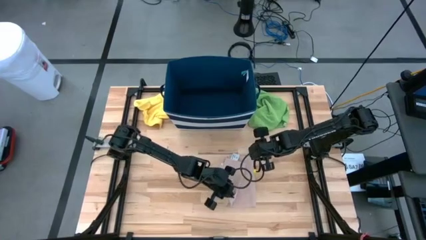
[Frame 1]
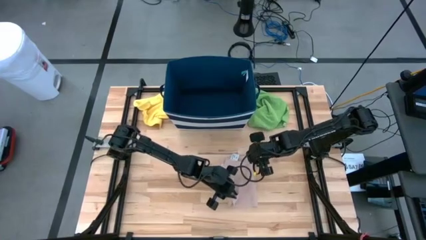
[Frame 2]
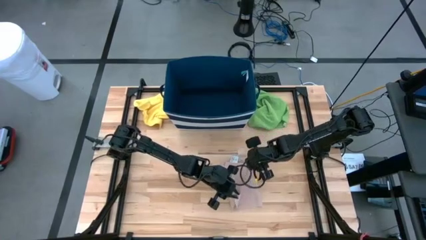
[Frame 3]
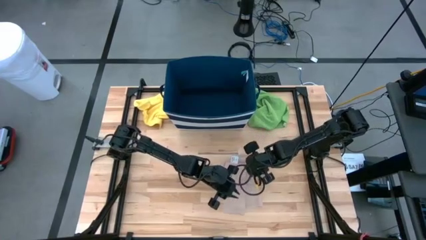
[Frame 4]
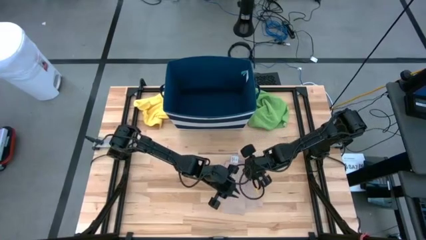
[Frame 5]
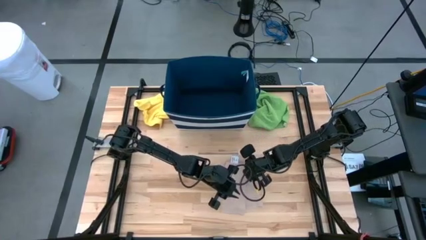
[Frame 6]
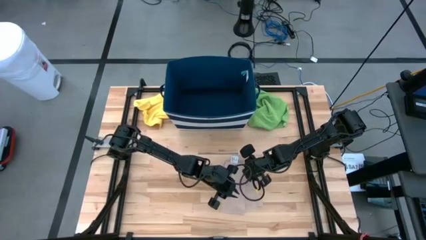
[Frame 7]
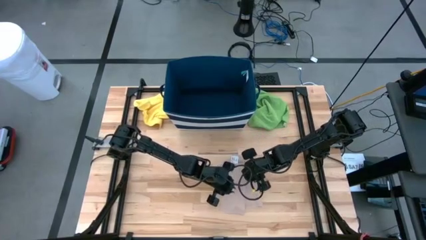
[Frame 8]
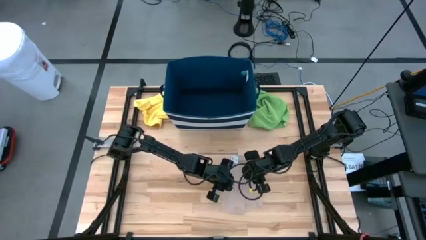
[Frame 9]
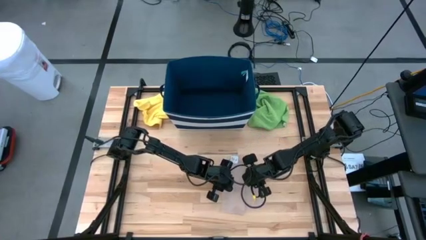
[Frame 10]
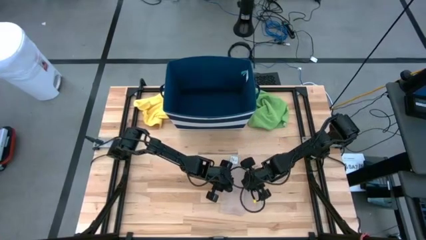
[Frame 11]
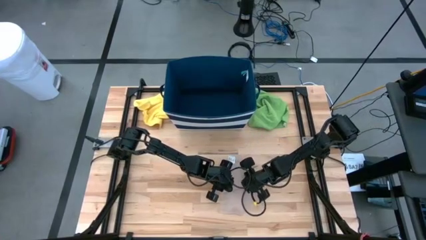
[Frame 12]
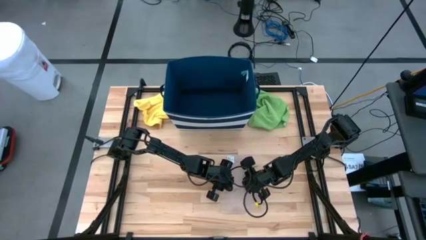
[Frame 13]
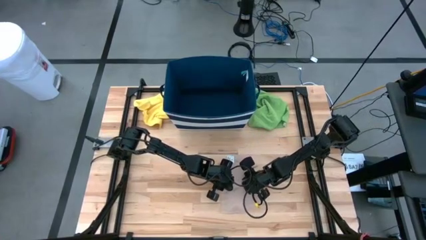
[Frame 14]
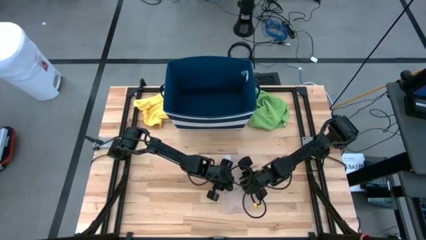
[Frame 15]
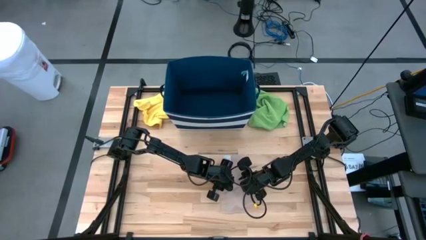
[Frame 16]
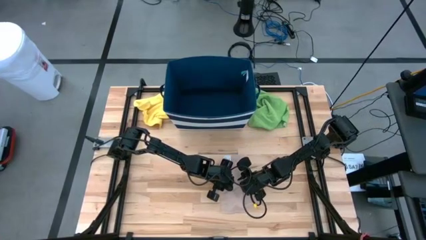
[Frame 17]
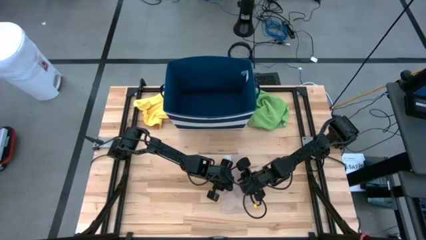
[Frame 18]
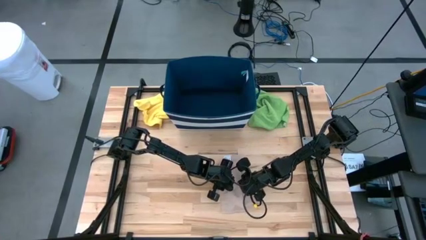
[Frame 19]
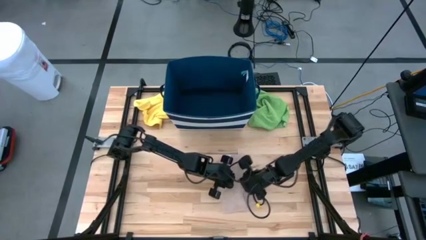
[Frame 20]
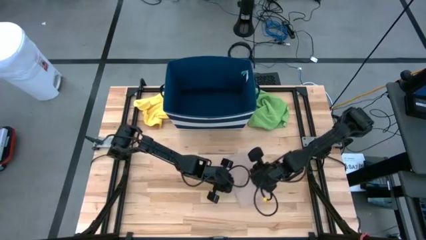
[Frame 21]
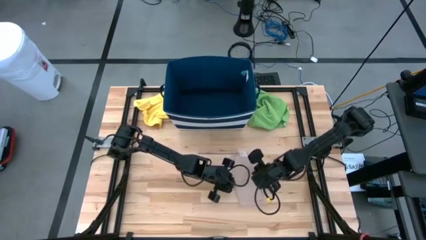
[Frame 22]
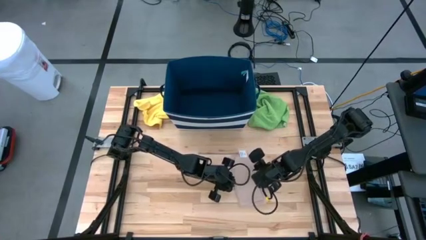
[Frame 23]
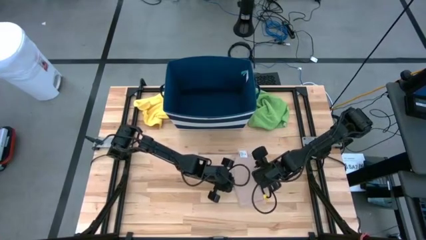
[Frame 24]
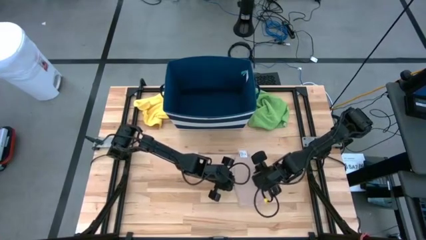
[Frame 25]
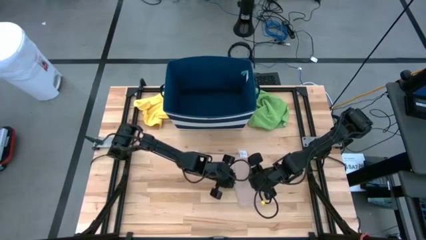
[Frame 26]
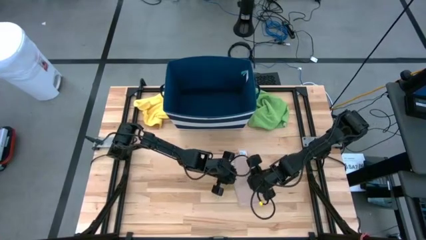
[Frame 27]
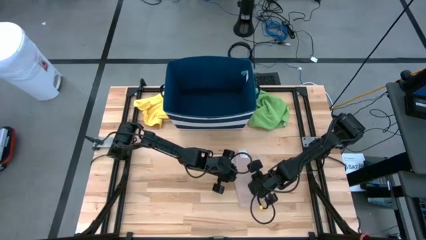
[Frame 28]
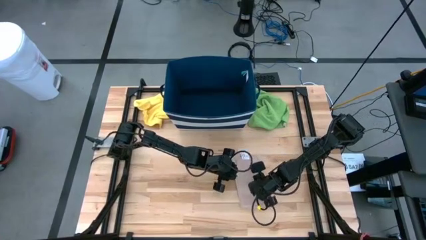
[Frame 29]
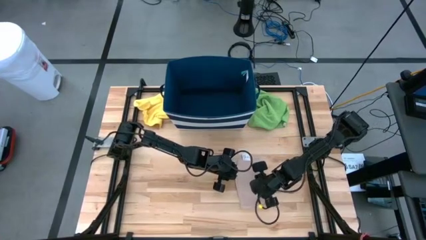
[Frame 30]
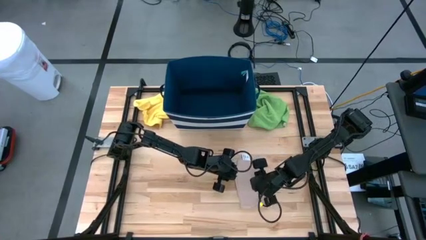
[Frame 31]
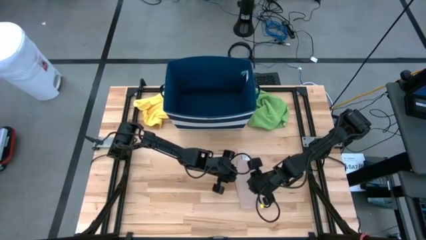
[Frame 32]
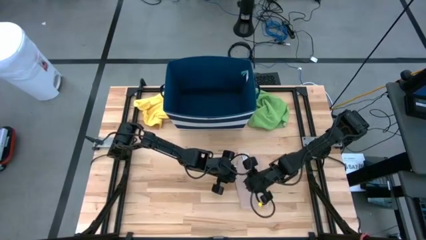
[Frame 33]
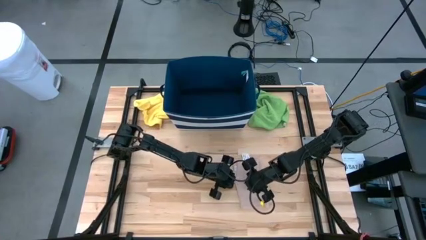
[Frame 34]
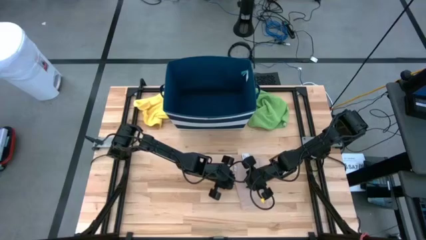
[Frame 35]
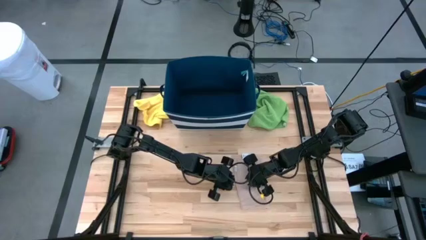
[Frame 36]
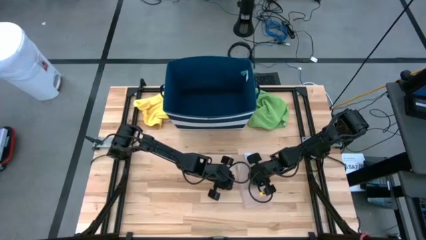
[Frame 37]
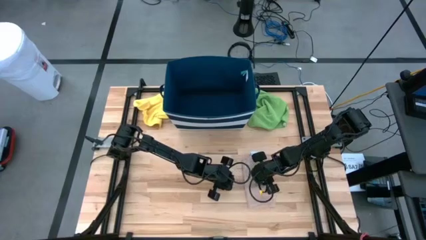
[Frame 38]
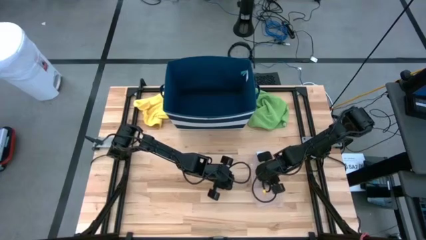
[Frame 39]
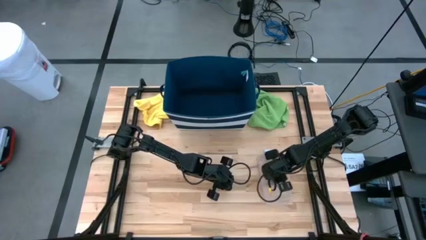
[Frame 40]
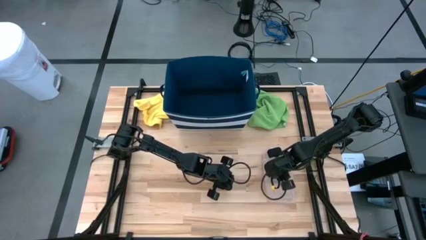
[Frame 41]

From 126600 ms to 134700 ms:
Task: Fold towel
Fold the brown towel

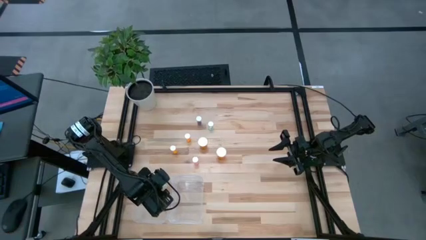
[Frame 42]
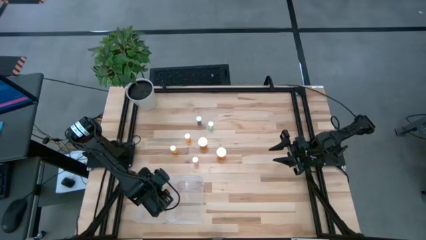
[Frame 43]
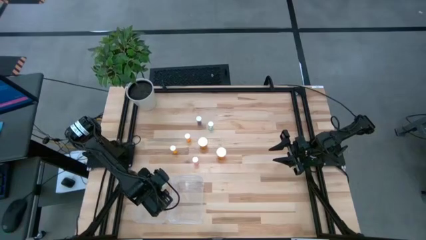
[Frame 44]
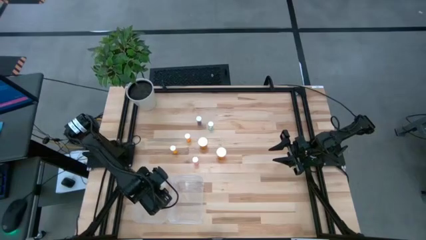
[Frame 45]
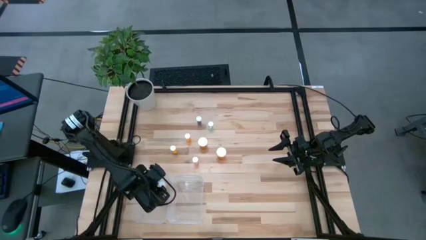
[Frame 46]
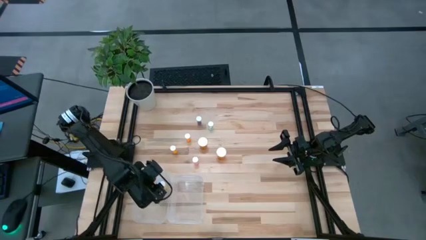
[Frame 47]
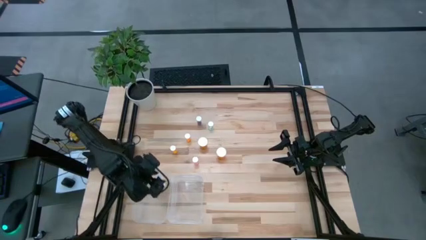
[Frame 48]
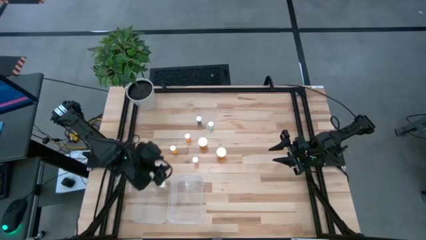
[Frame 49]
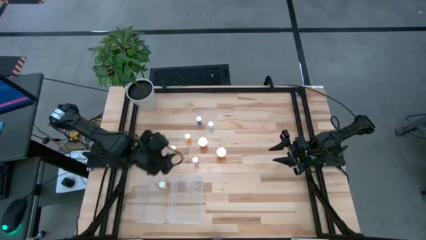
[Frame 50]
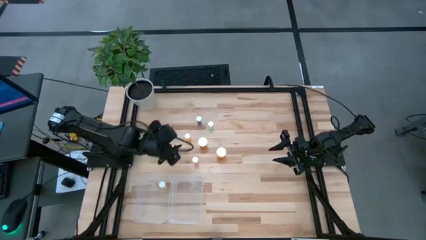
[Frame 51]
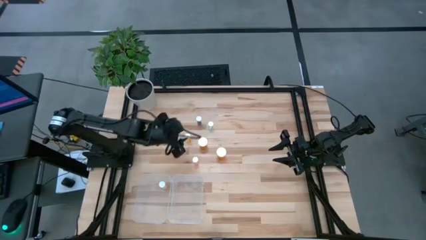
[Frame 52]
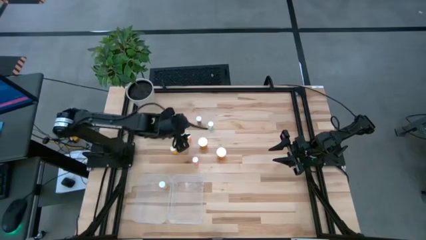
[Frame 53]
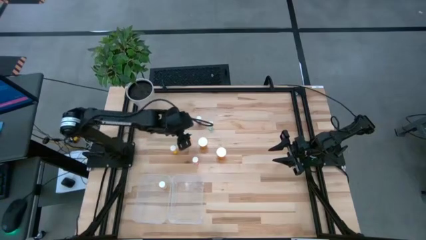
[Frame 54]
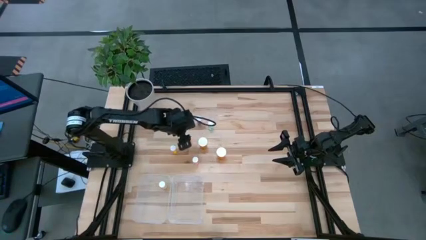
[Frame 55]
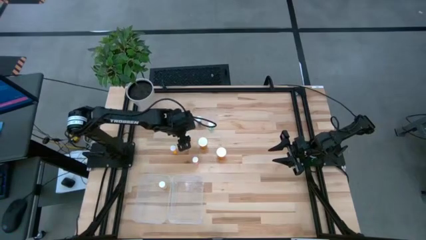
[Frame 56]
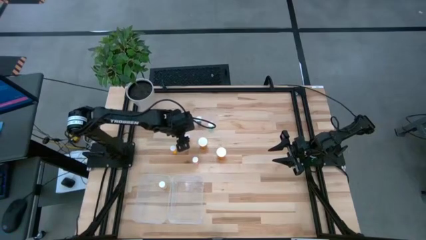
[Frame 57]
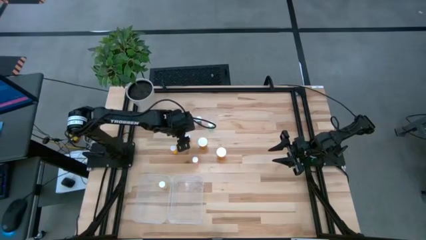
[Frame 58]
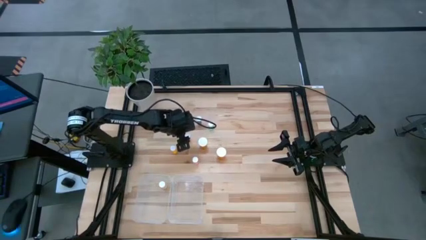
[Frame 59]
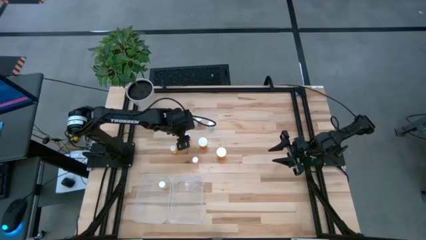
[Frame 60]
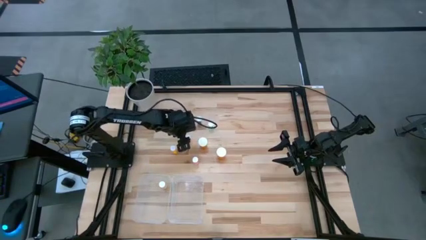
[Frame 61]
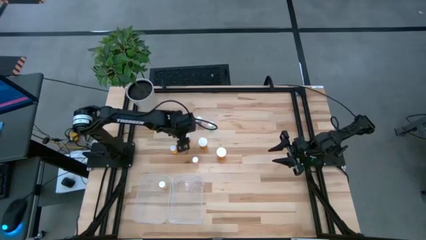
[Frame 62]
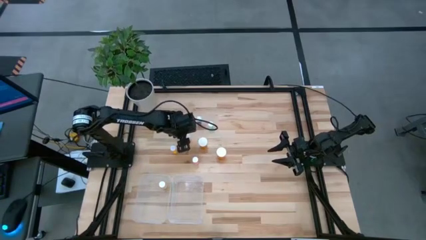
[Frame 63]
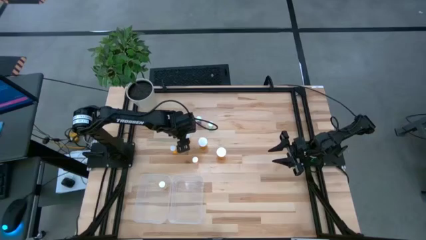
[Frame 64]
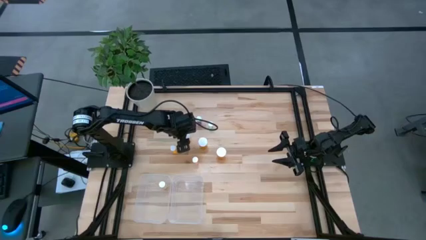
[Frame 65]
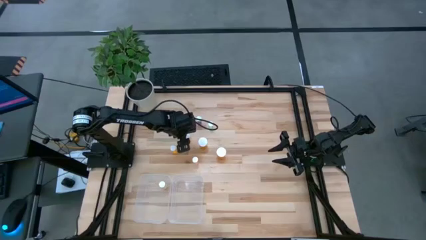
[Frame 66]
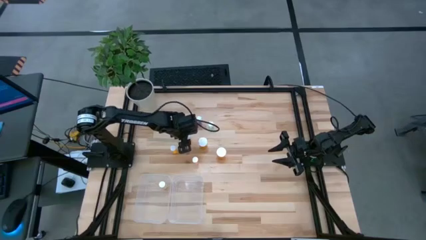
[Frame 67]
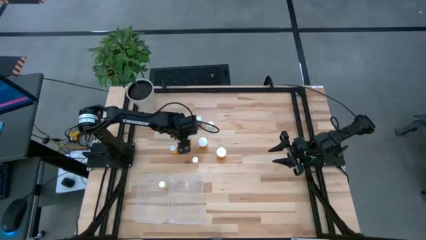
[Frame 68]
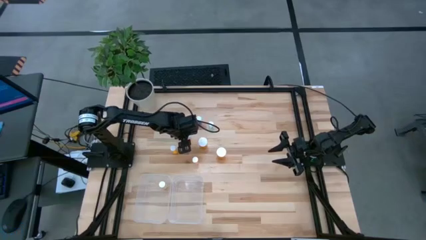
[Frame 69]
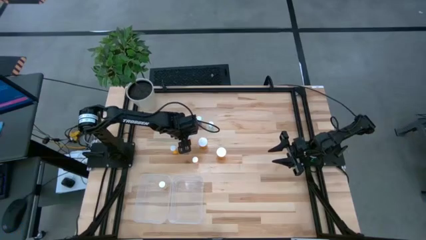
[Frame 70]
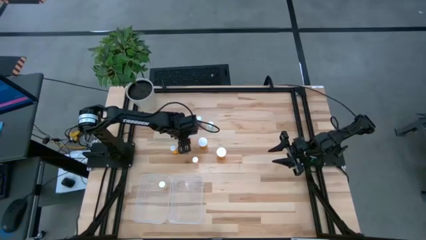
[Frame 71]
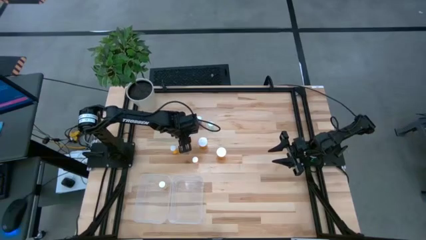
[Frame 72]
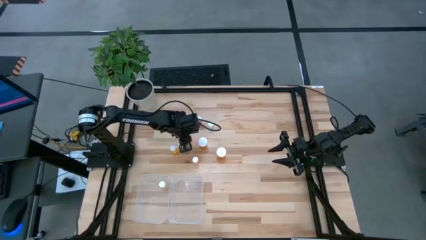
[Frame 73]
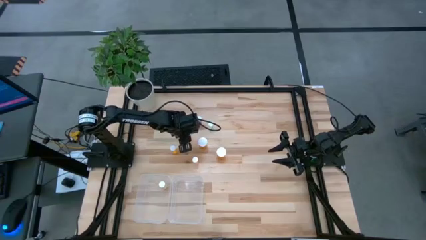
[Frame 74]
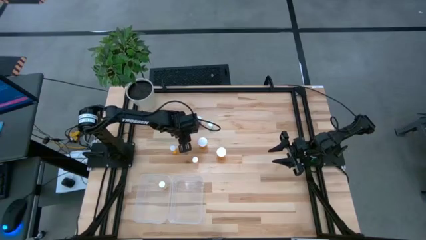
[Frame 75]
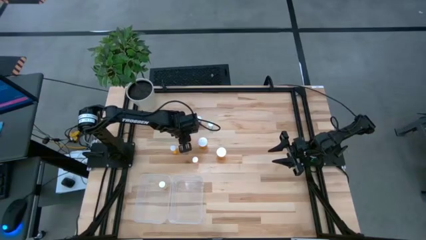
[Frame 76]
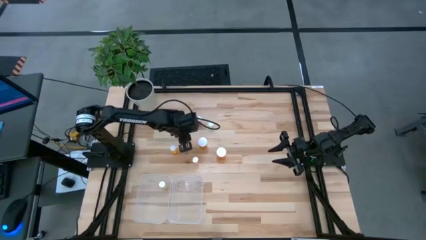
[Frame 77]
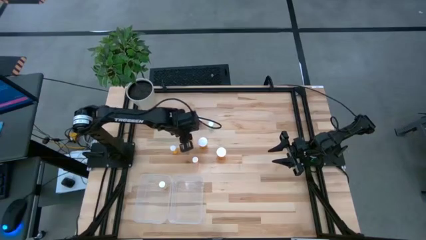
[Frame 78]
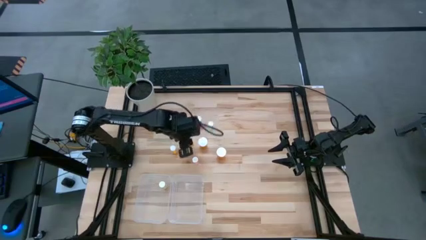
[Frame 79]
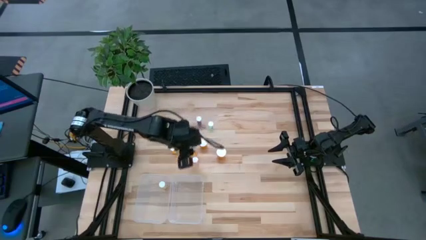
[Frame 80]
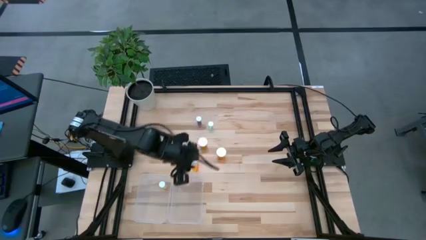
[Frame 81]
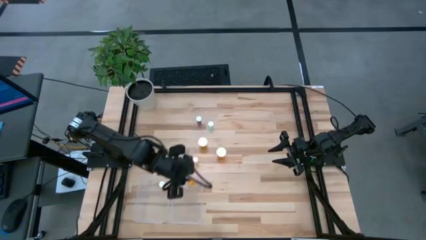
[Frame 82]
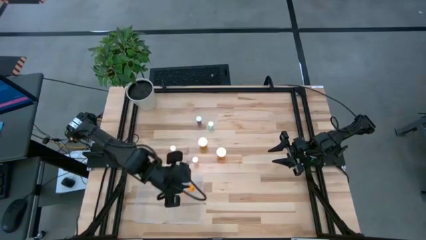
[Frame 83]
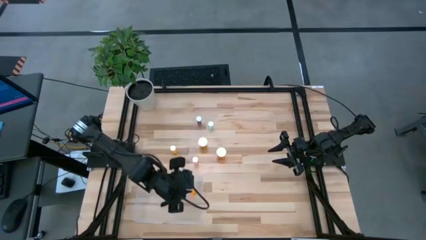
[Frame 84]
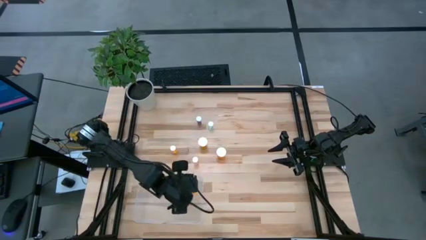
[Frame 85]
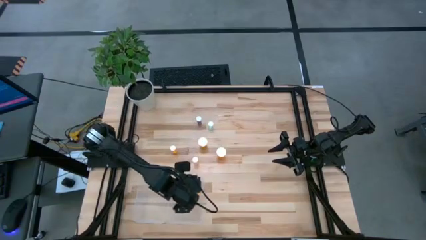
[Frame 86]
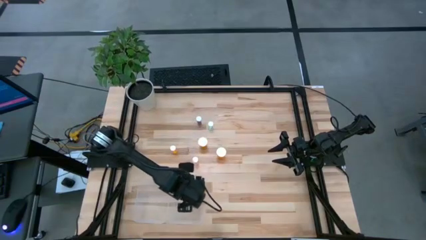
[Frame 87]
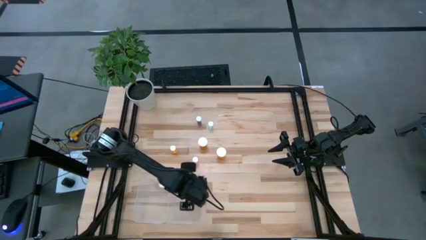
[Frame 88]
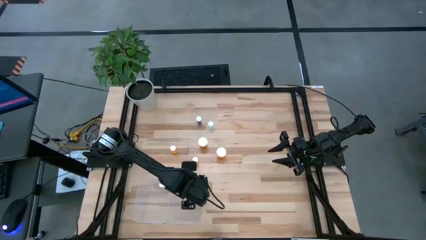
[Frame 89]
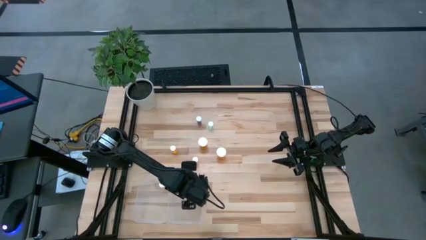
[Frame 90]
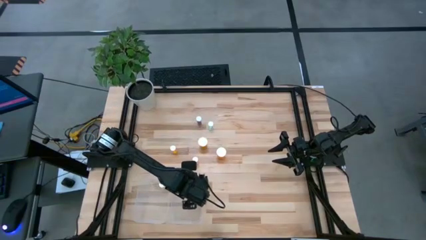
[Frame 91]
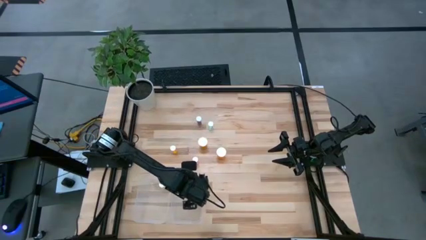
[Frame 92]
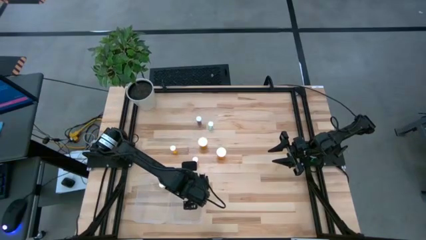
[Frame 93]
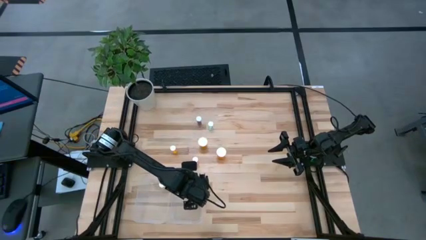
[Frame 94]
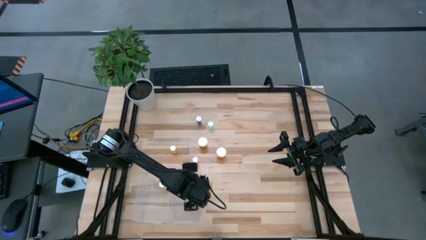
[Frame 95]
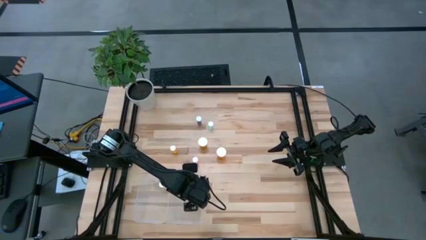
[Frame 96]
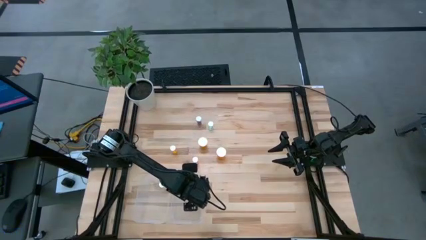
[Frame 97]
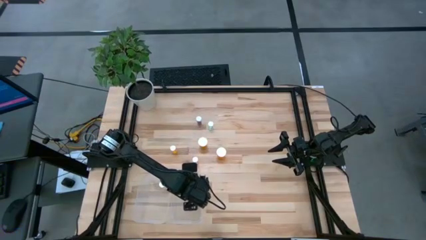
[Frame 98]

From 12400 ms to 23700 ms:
Task: Pick and place medicine bottles into bin by pill shape (circle, oval)
Put the small orange capsule bottle into the right transparent bin
